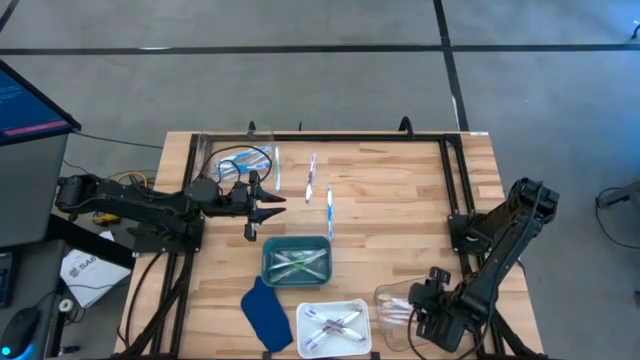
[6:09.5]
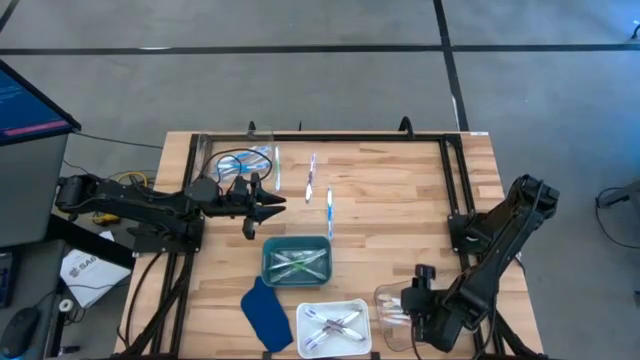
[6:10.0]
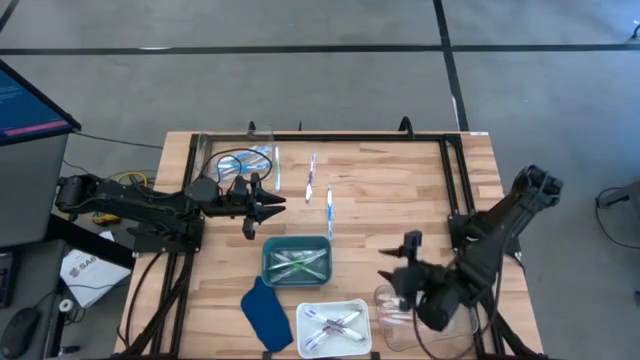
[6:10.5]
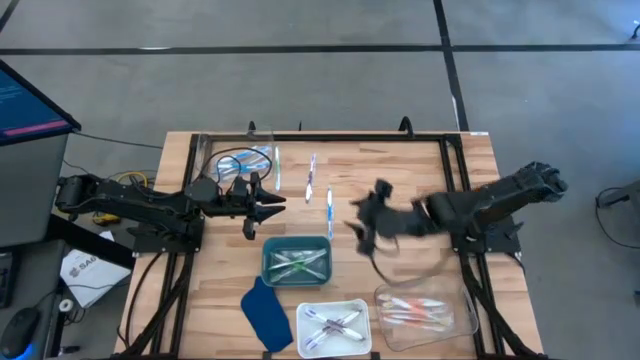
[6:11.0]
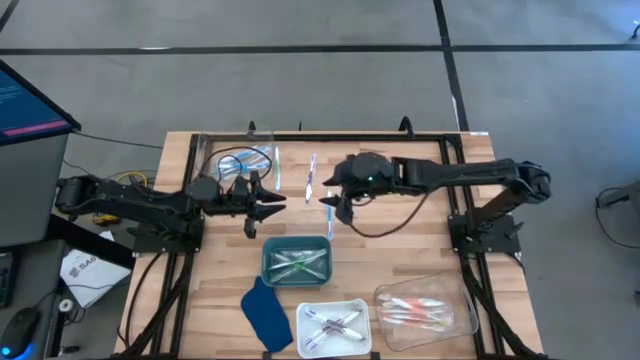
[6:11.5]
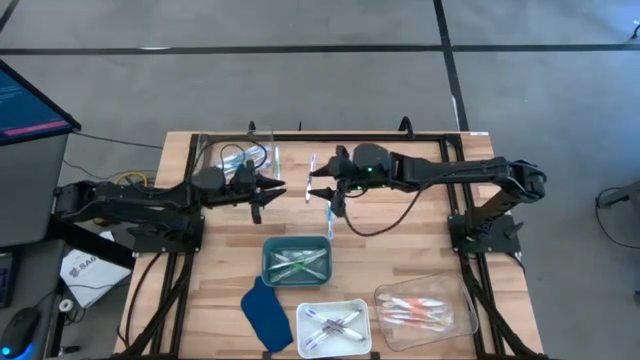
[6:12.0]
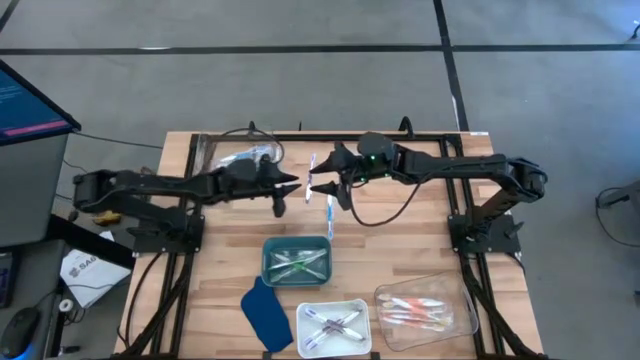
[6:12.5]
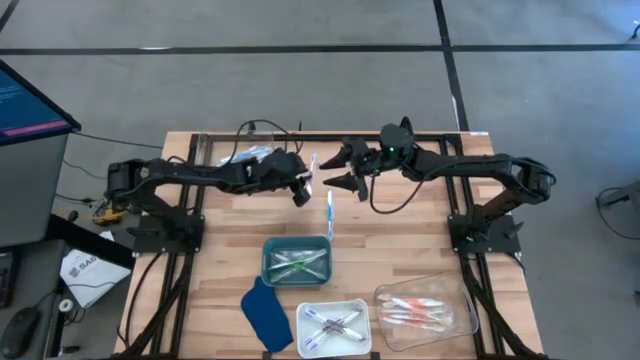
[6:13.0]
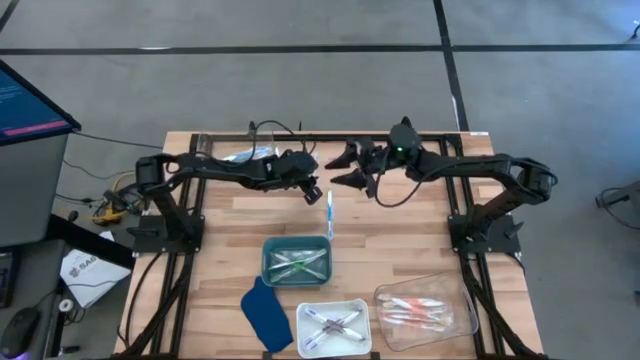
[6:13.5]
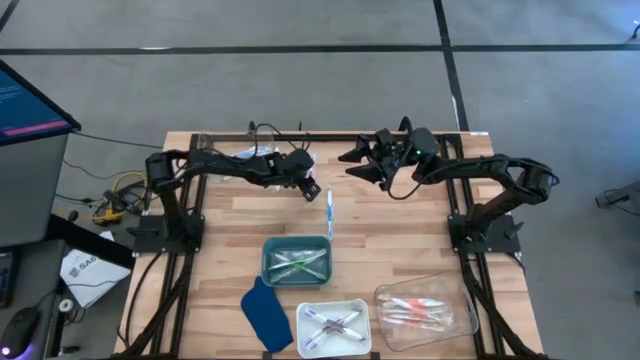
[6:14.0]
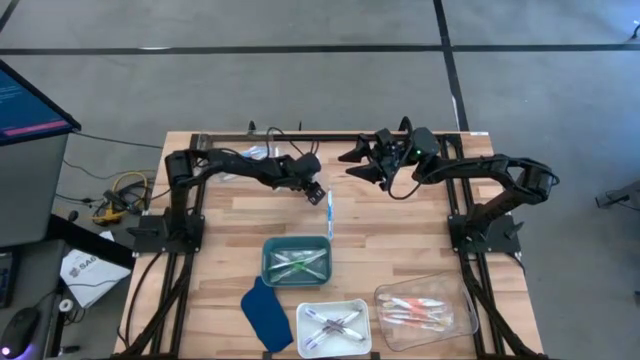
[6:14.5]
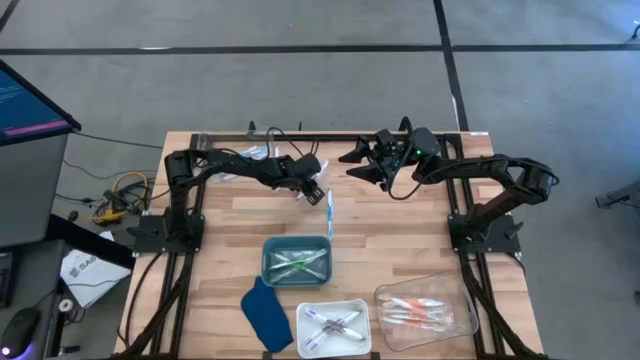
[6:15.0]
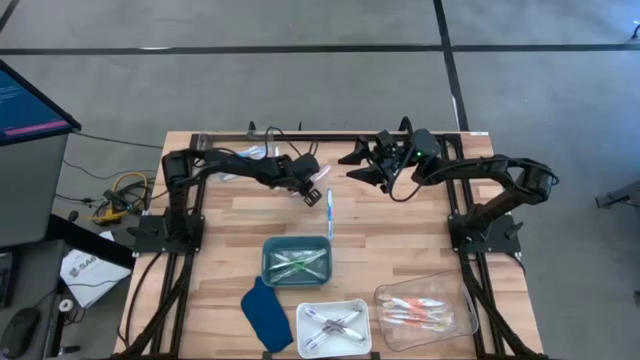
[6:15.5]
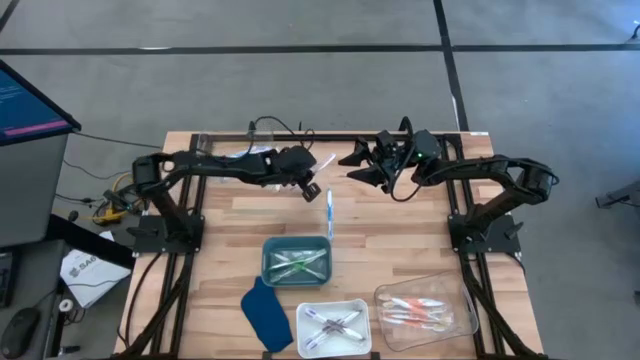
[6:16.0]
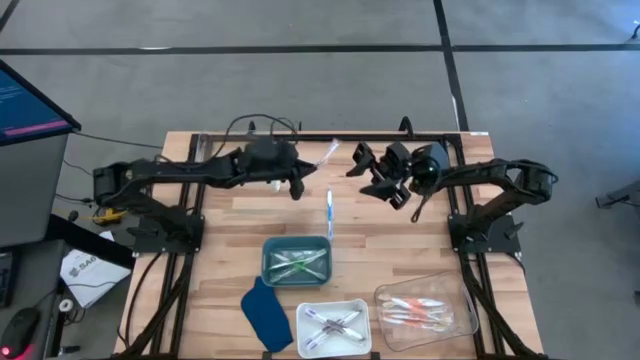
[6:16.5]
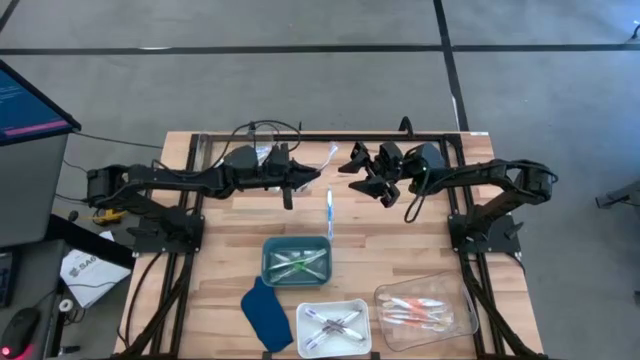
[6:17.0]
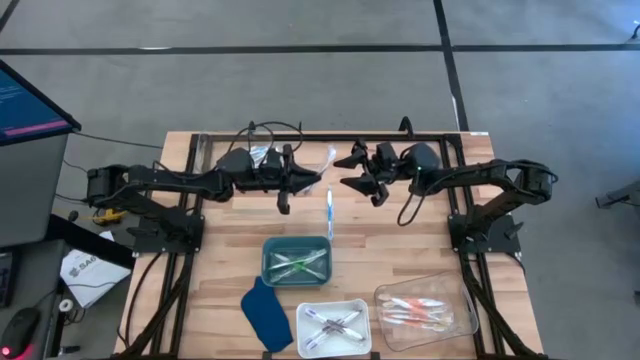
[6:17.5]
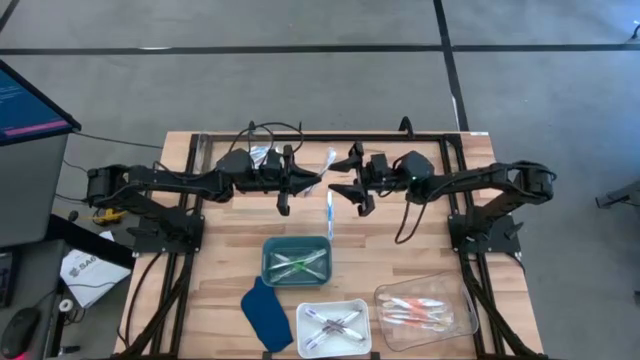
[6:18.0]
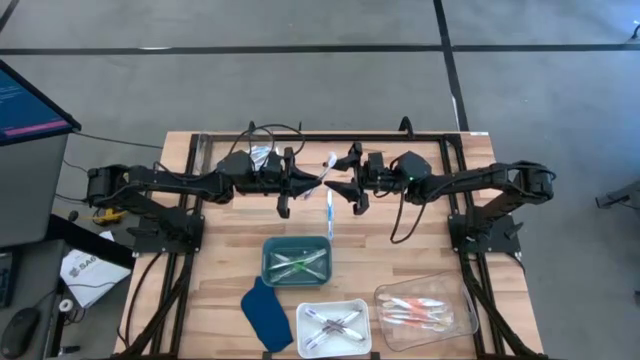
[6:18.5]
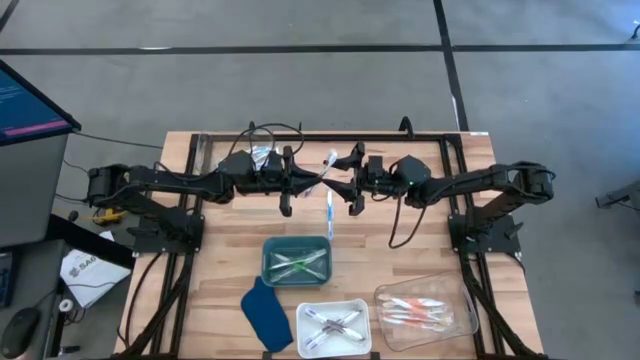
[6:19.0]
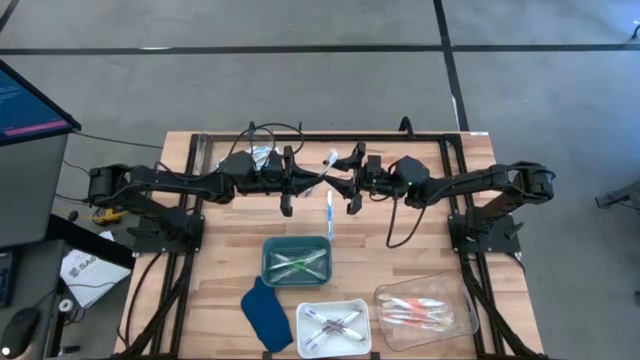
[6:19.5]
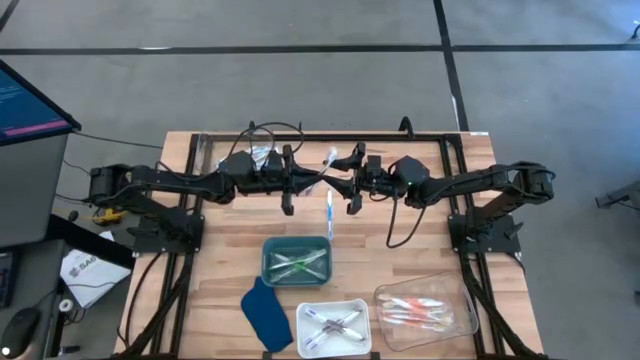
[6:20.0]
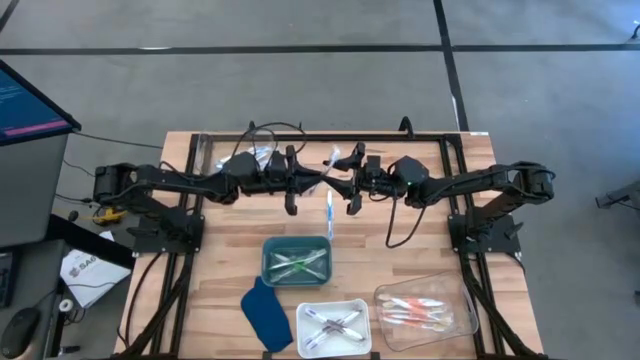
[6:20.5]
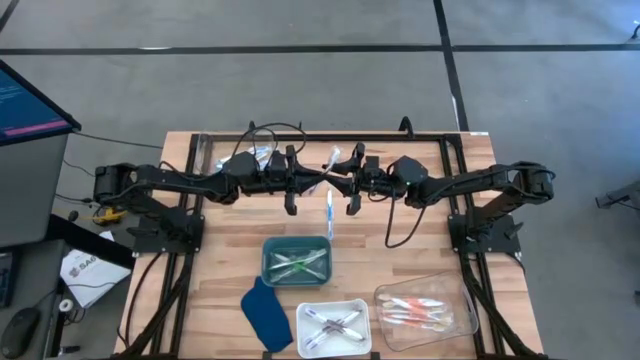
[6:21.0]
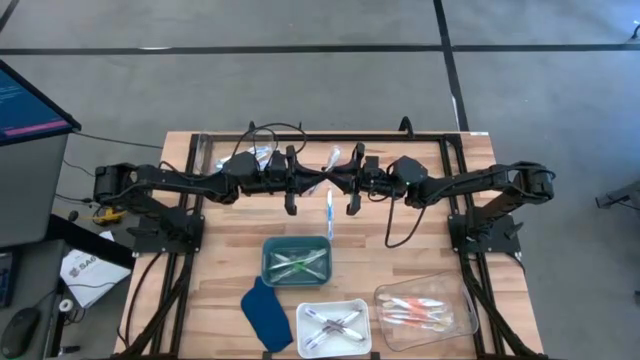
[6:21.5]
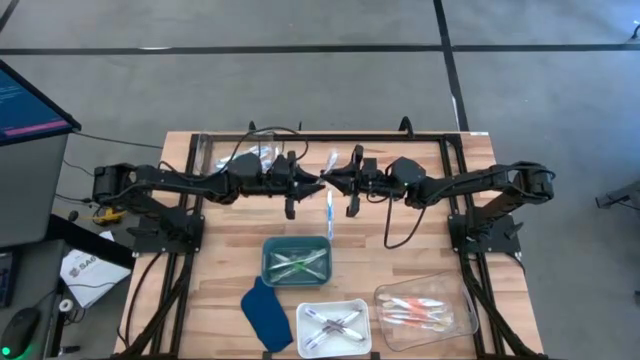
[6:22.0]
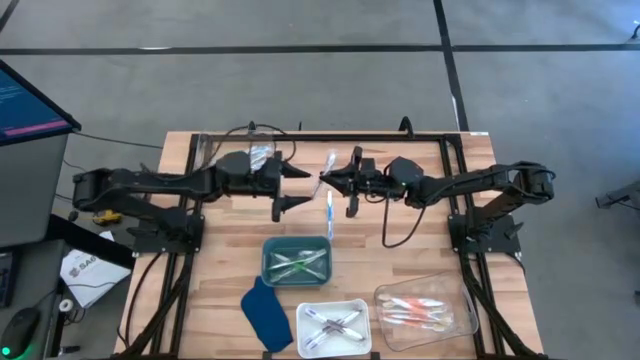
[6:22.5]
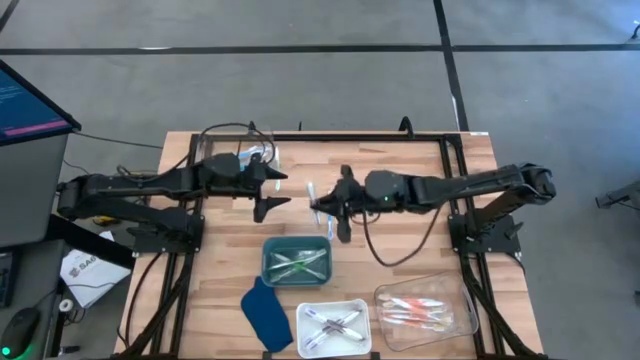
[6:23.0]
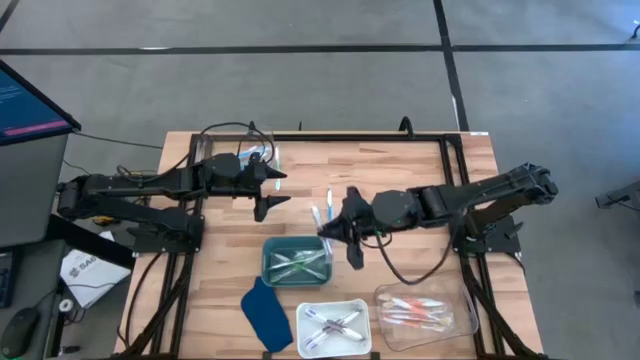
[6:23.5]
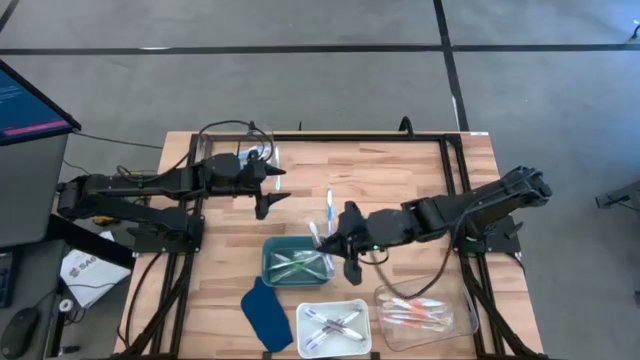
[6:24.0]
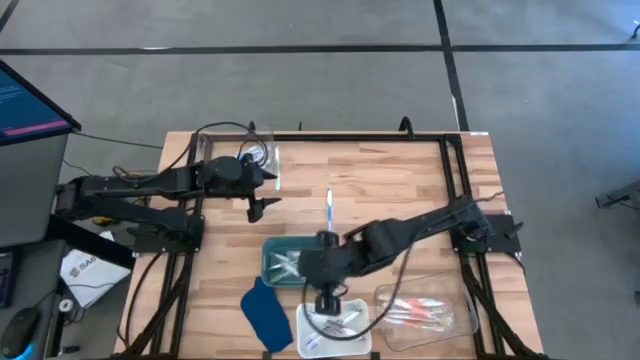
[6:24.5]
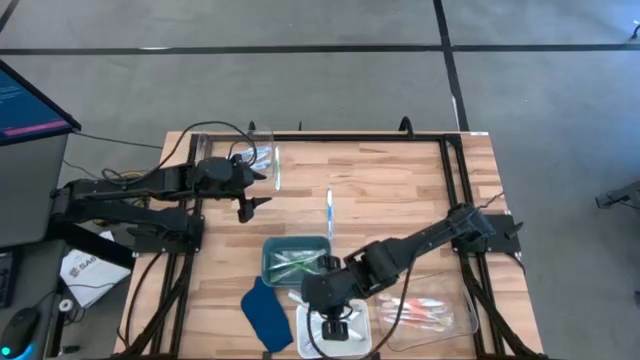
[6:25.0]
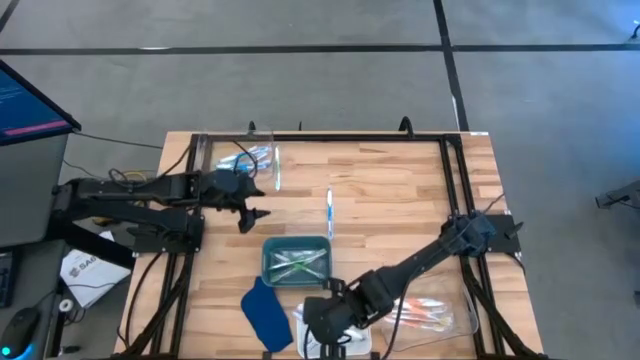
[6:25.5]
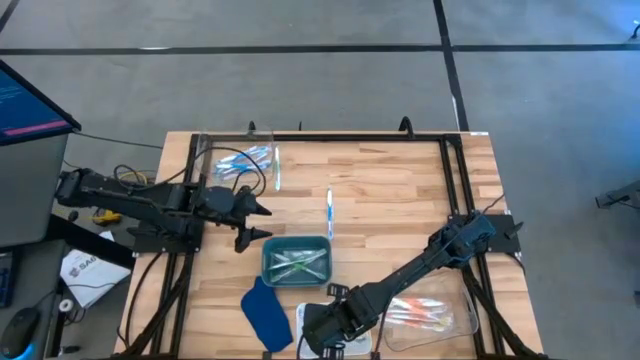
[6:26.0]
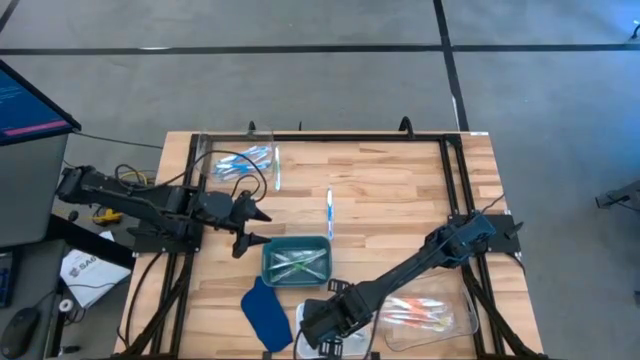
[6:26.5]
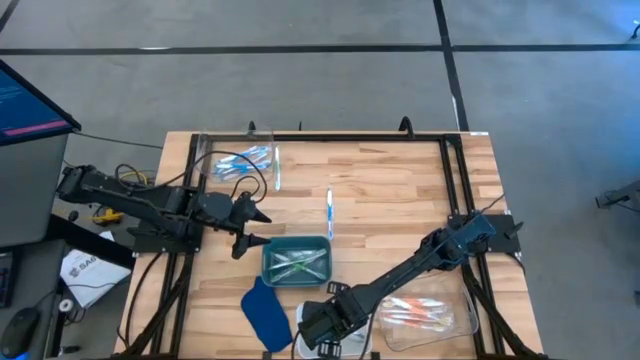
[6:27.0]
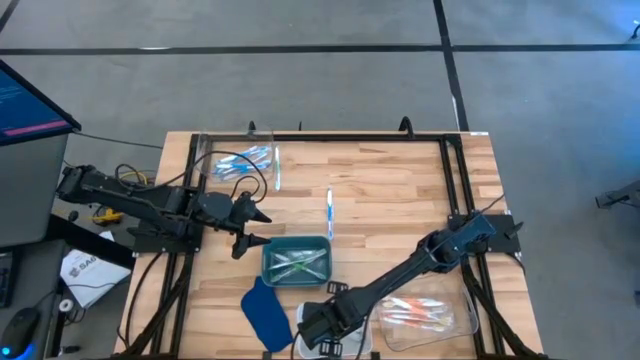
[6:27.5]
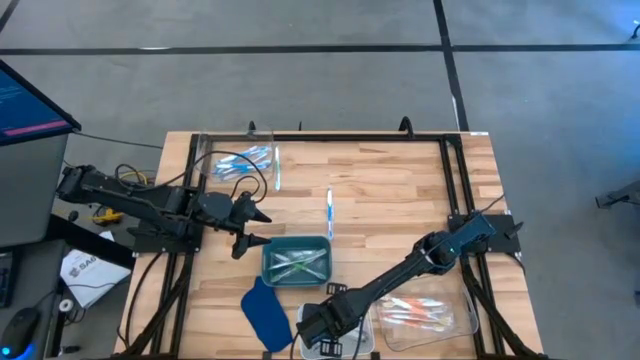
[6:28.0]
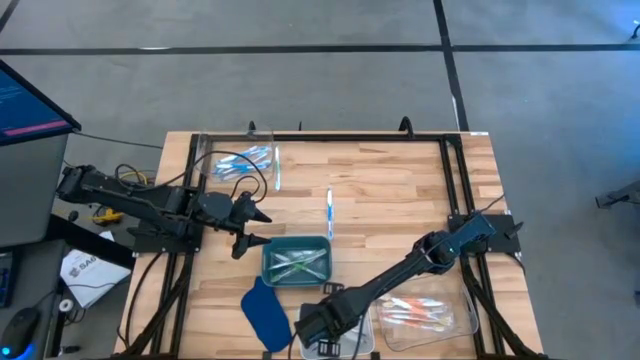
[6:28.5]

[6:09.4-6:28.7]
Task: Pick & Place Toothbrushes
Put the purple toothbrush into the white bin
